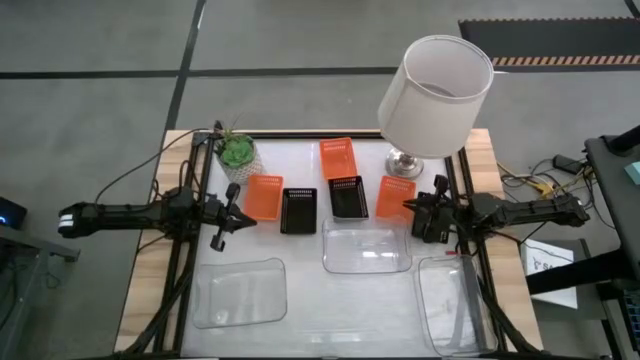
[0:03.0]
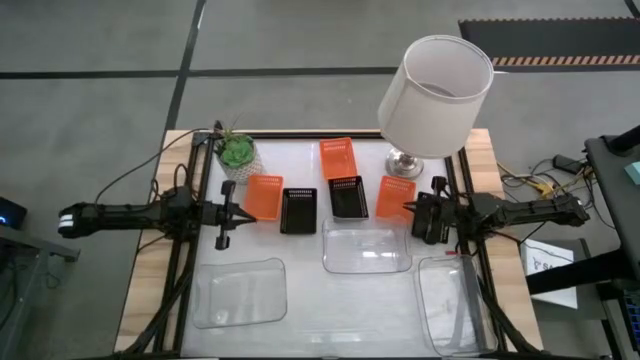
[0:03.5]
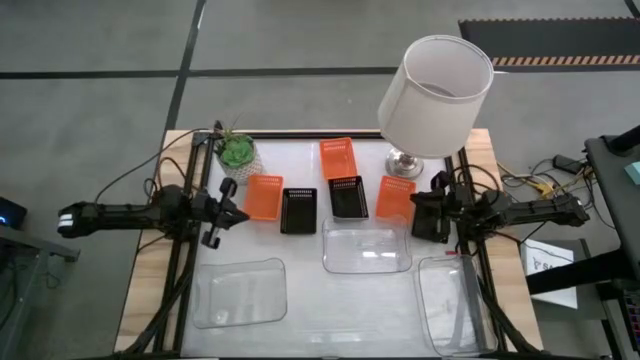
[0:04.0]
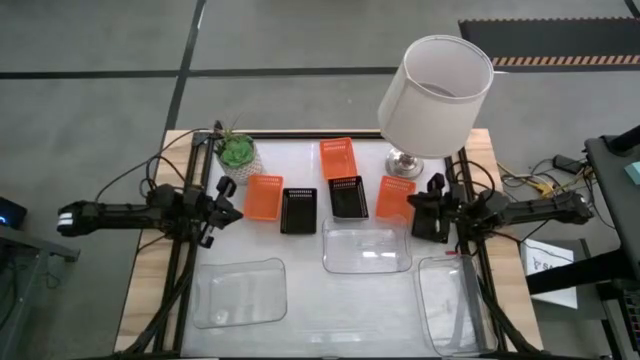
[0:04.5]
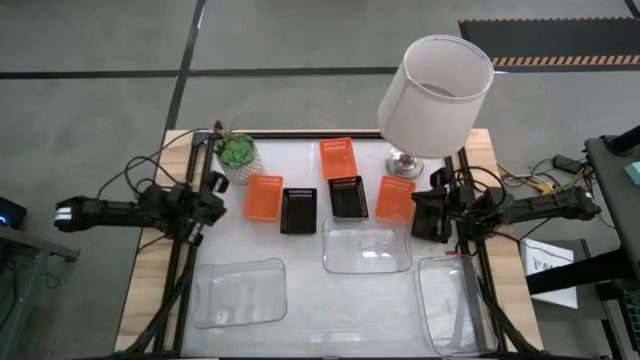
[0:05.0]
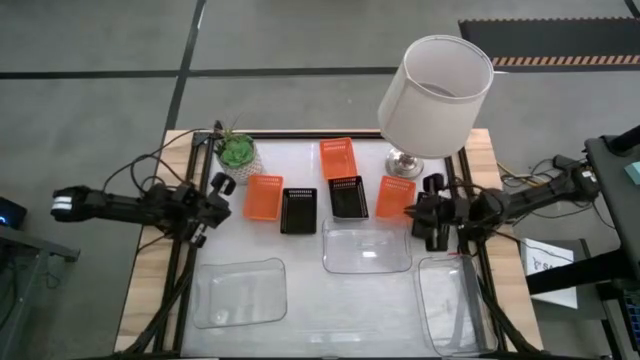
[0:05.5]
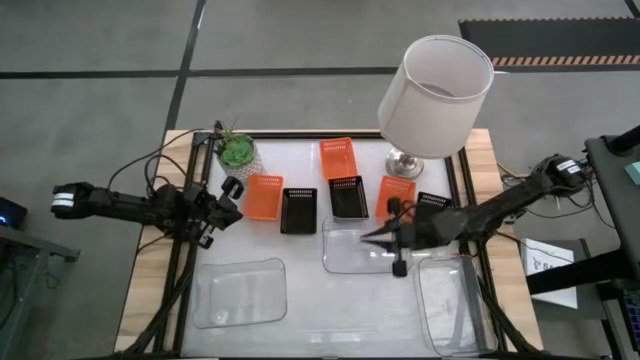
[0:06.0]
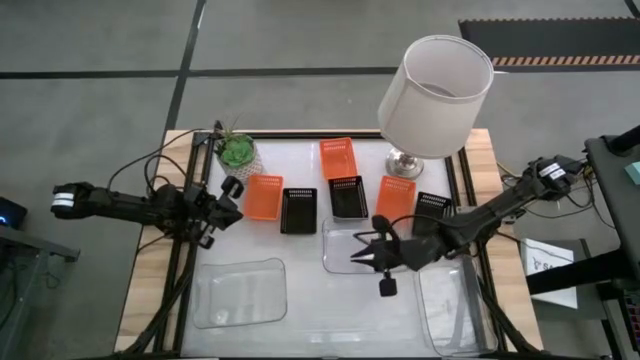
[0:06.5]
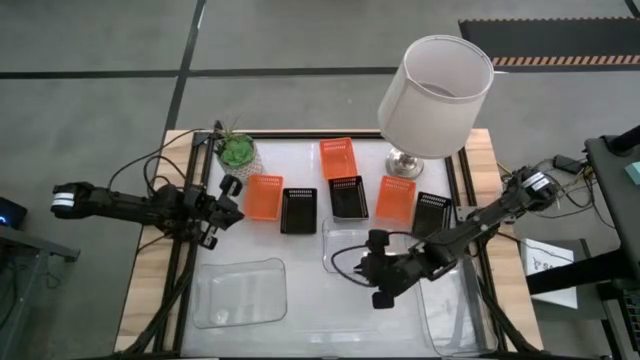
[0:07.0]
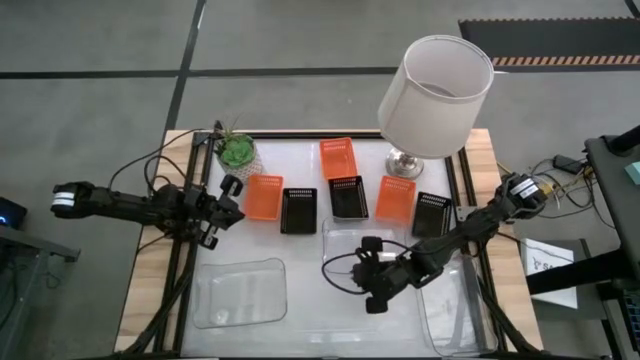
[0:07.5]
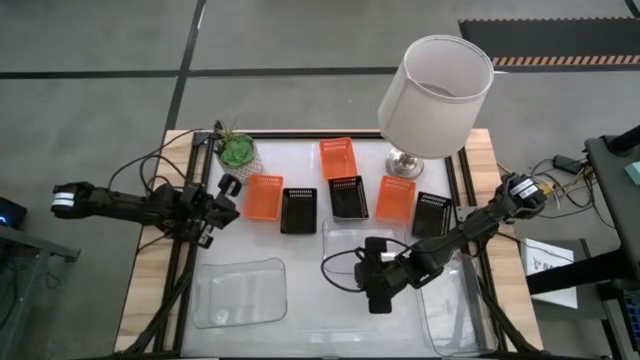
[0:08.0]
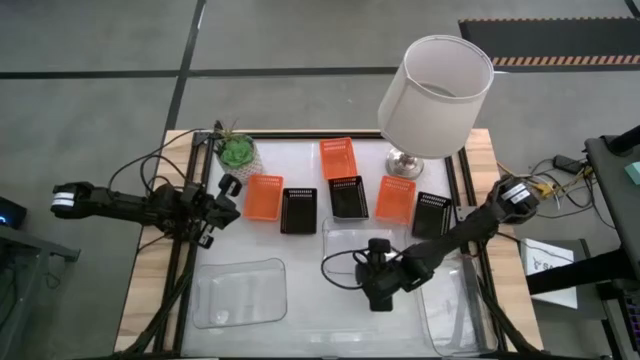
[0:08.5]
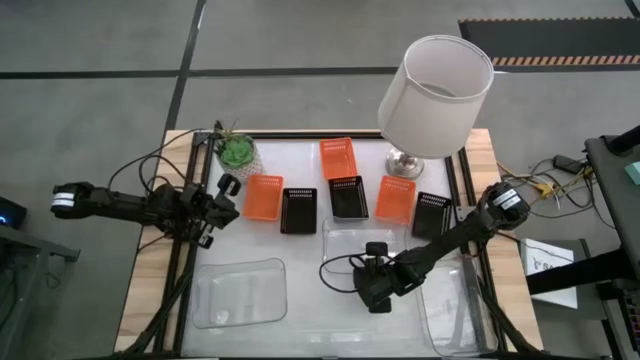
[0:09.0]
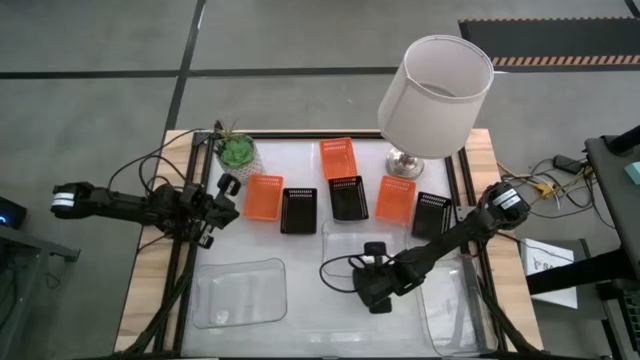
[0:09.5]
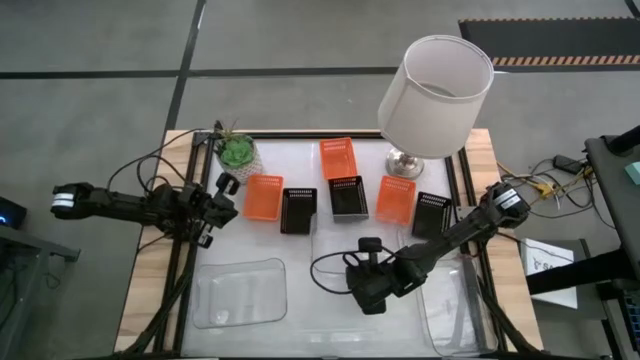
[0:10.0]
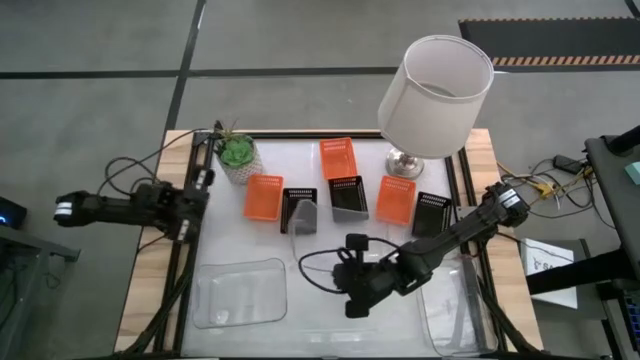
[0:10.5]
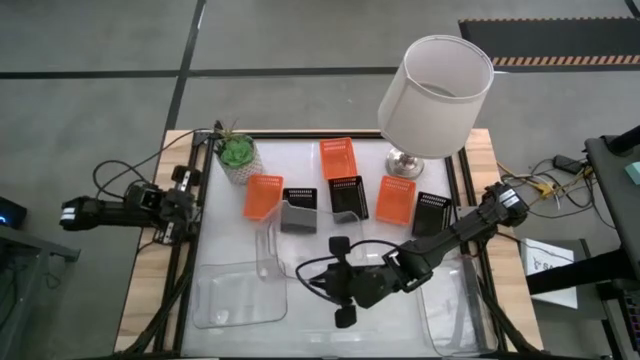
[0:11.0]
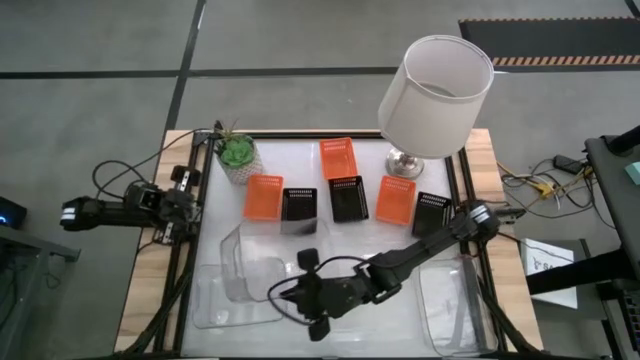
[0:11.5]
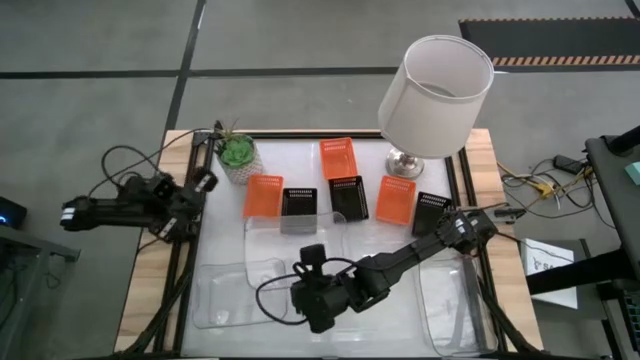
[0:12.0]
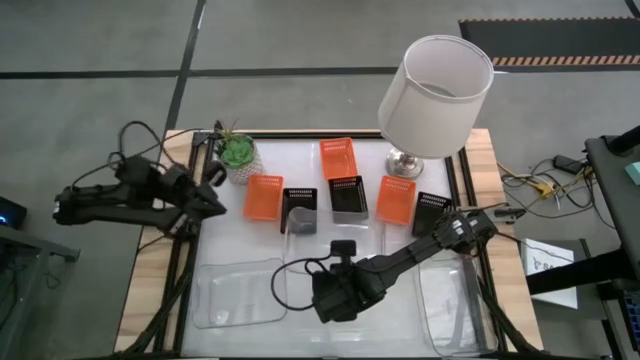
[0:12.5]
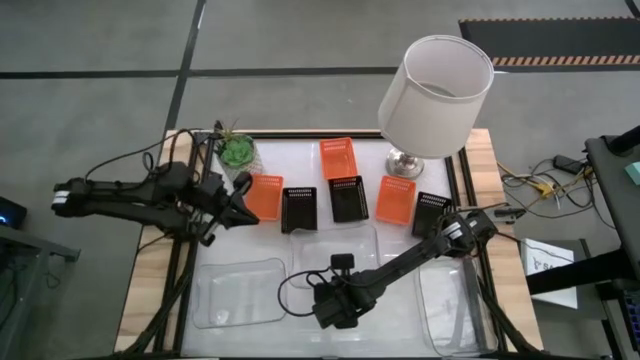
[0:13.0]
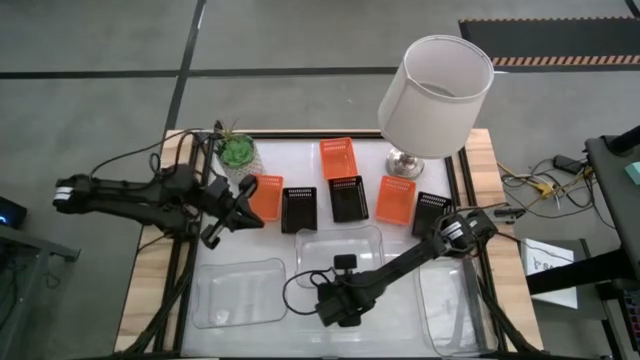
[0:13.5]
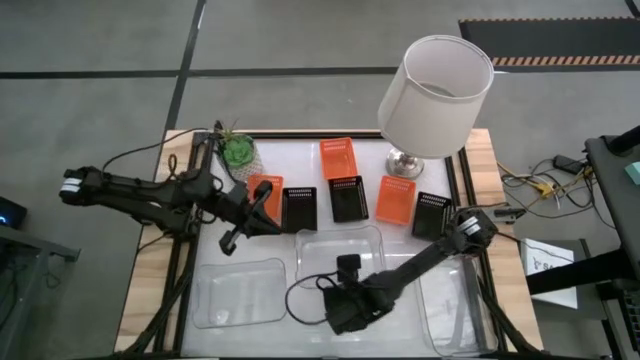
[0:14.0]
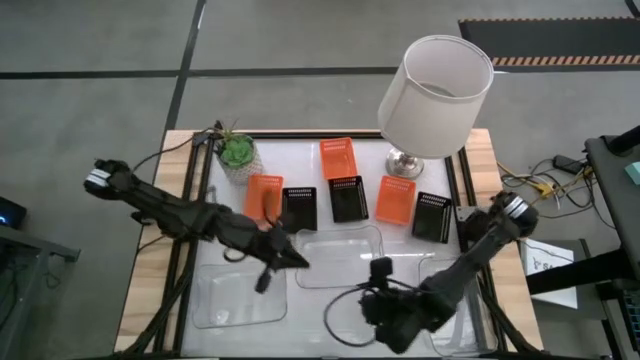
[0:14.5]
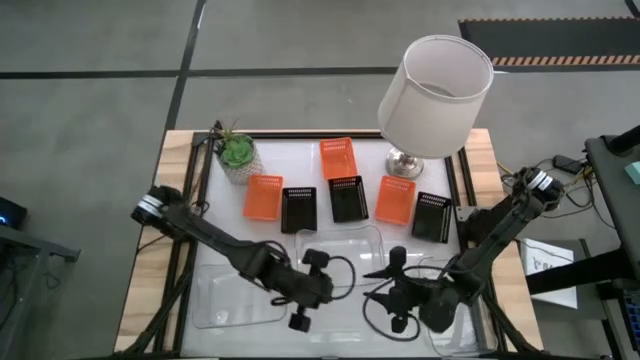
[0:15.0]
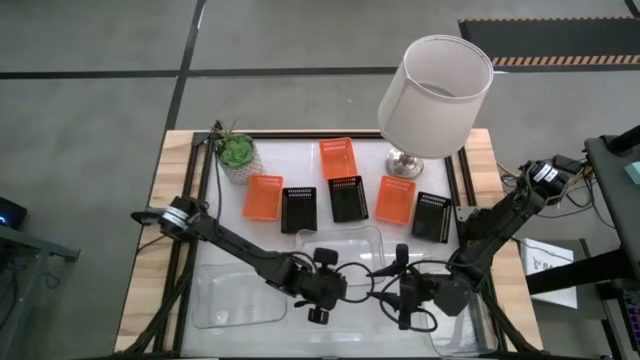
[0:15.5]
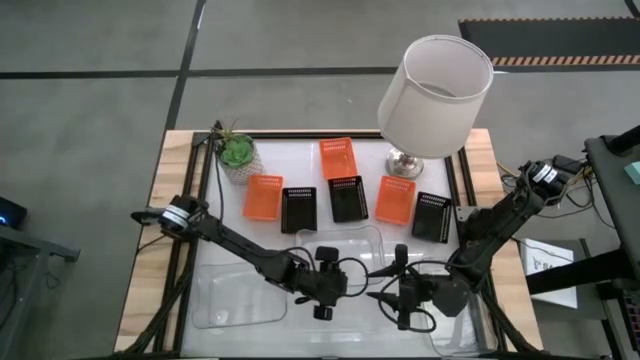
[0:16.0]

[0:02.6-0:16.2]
Stack the middle transparent bin on the left transparent bin
